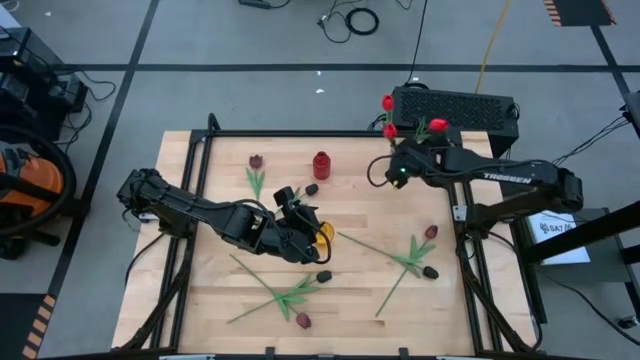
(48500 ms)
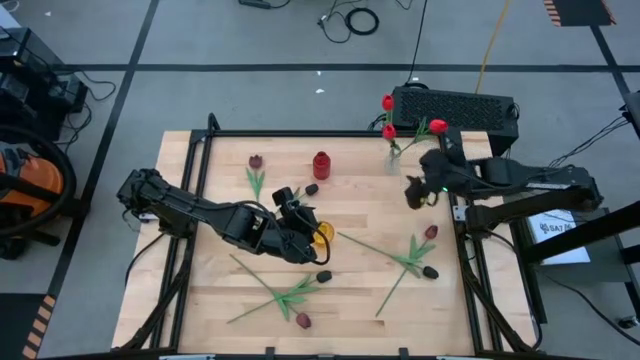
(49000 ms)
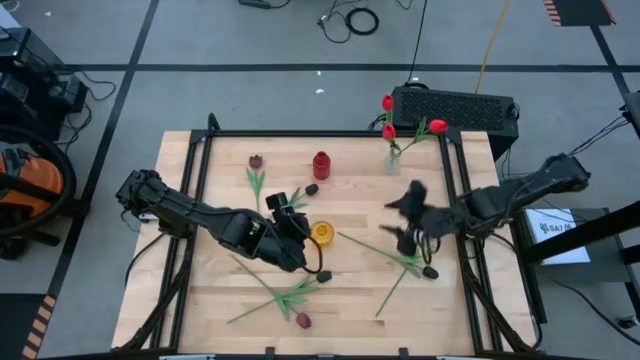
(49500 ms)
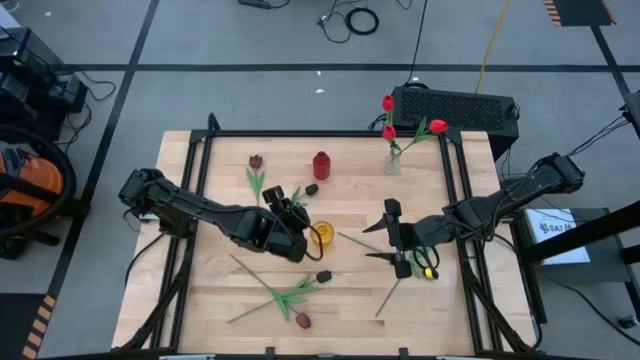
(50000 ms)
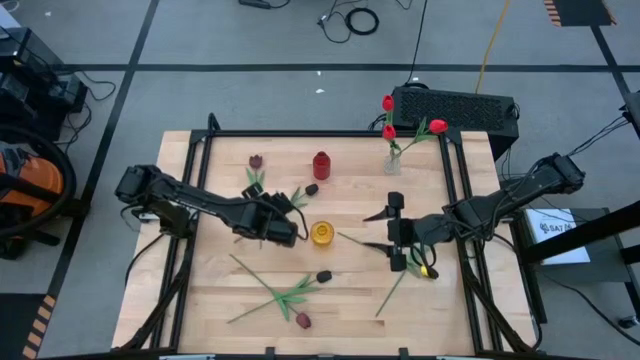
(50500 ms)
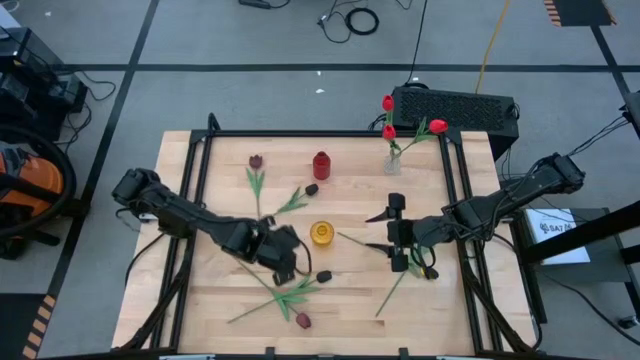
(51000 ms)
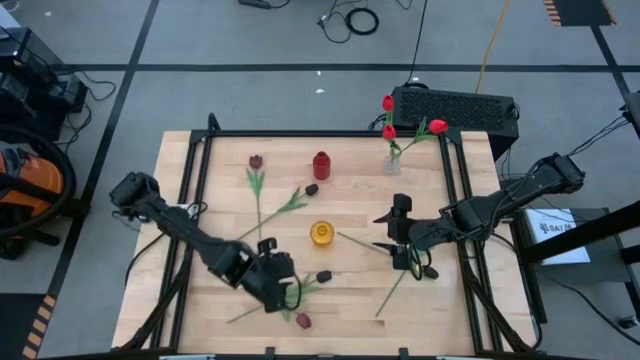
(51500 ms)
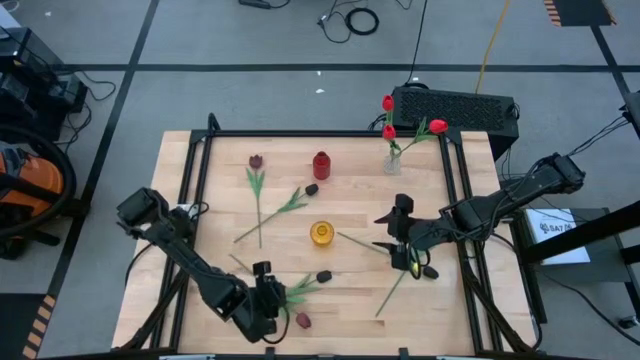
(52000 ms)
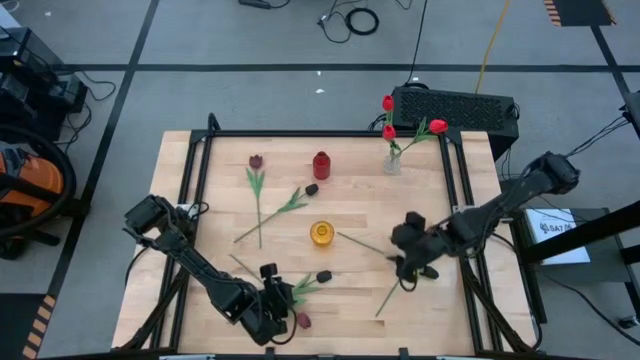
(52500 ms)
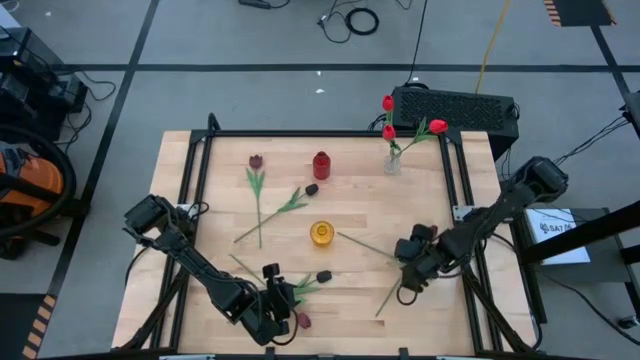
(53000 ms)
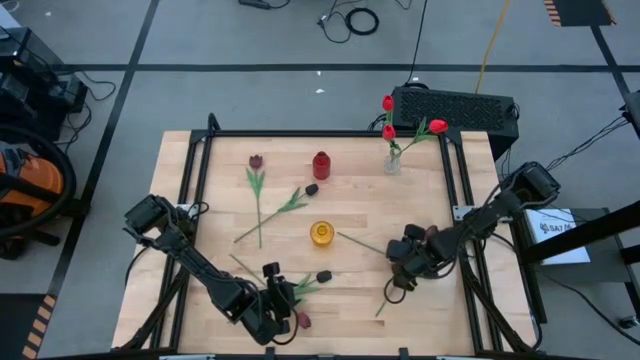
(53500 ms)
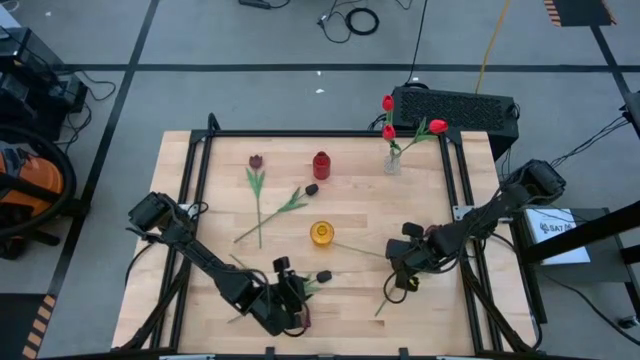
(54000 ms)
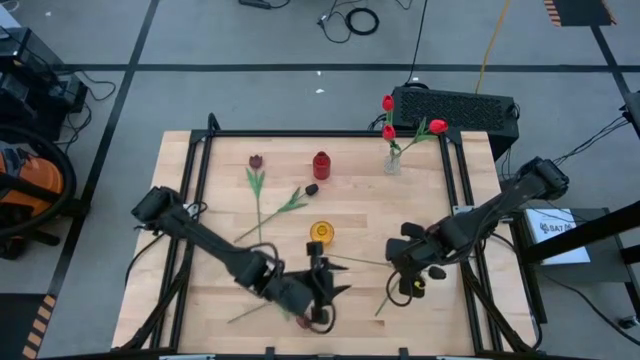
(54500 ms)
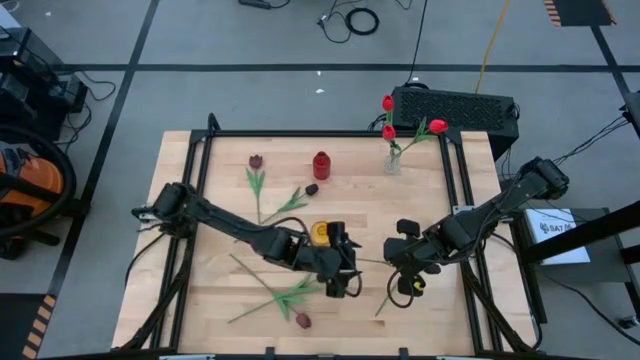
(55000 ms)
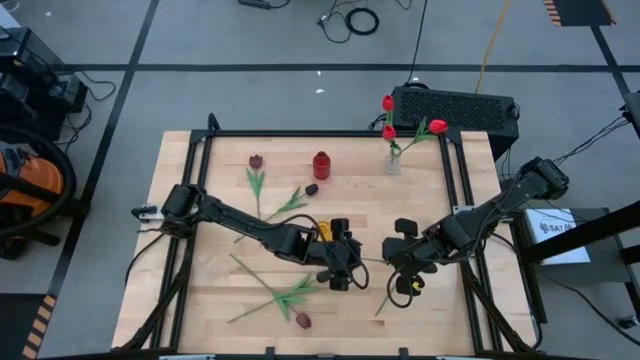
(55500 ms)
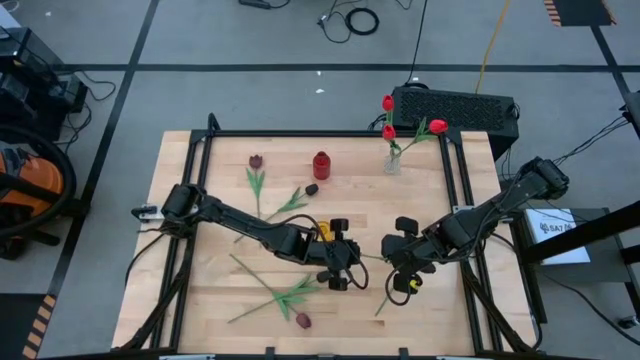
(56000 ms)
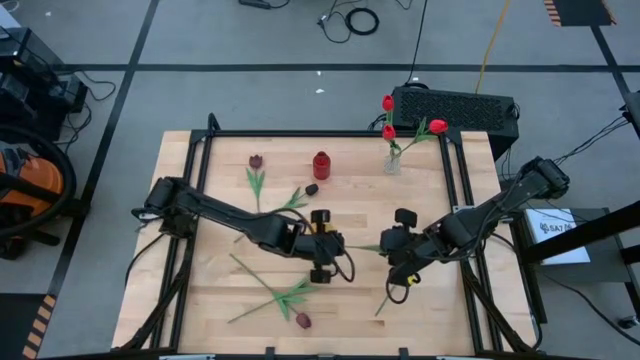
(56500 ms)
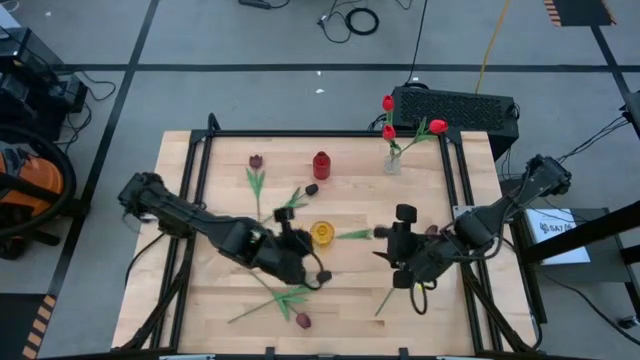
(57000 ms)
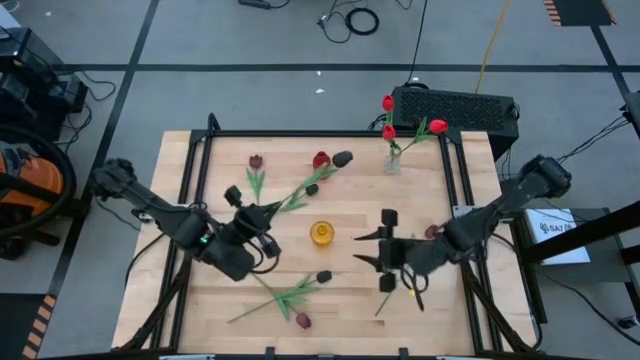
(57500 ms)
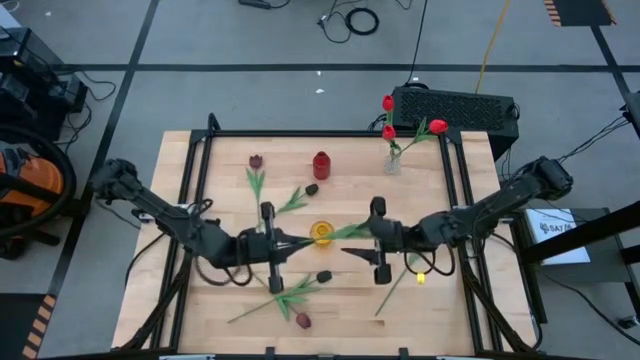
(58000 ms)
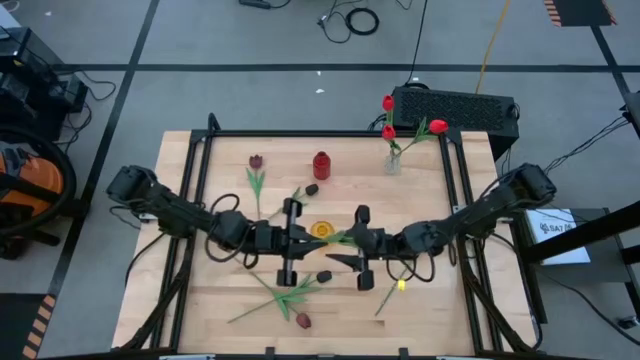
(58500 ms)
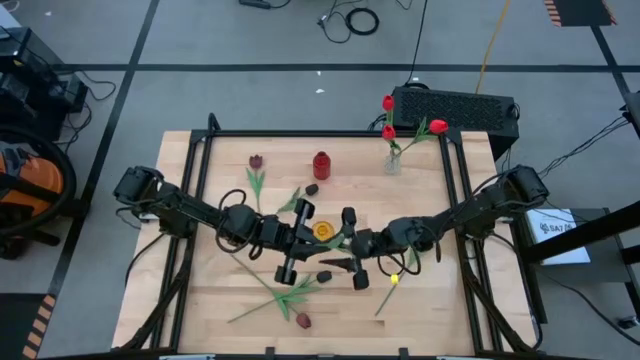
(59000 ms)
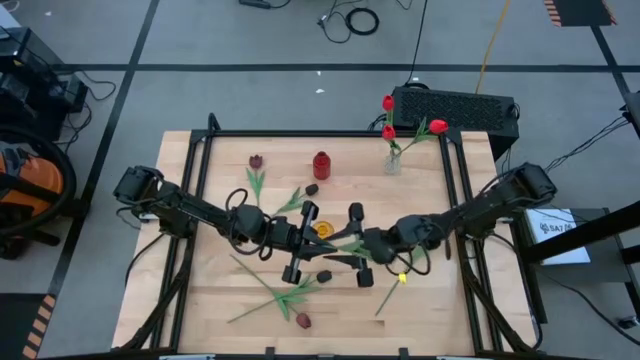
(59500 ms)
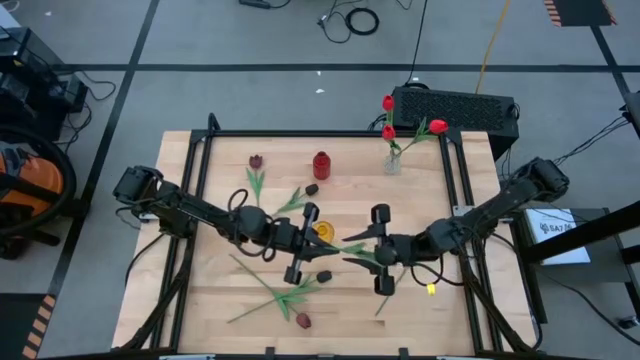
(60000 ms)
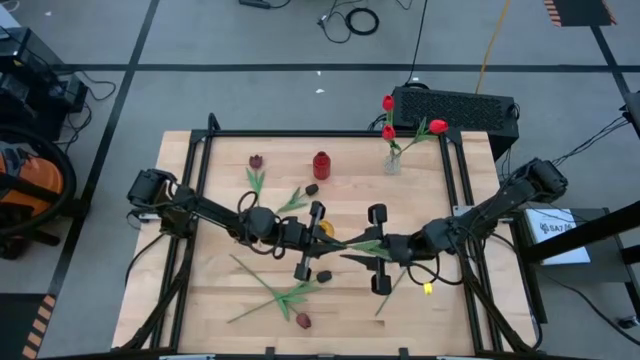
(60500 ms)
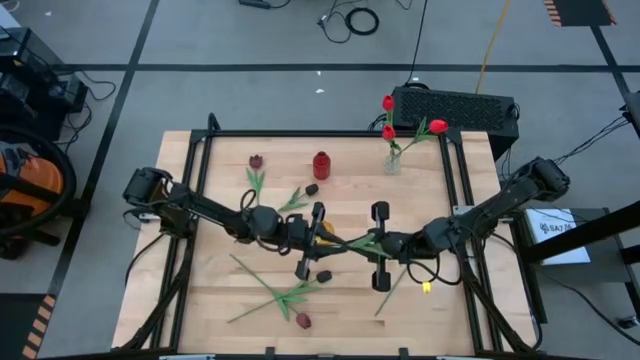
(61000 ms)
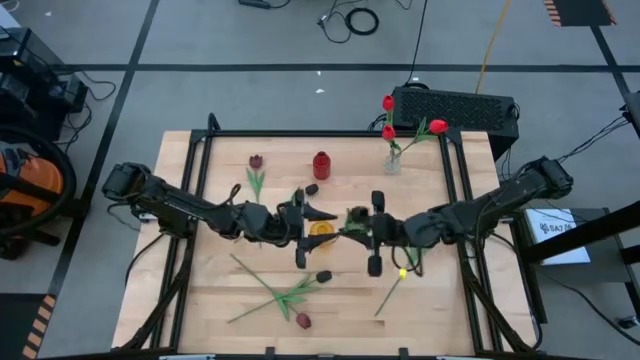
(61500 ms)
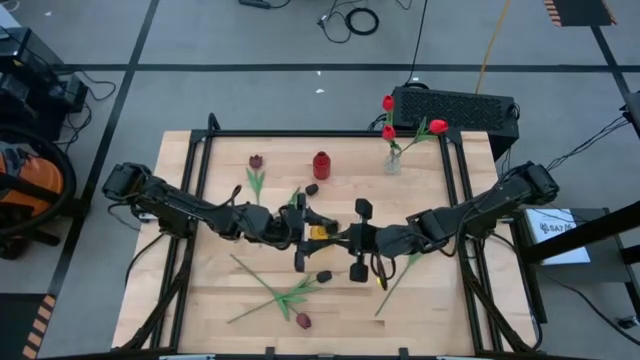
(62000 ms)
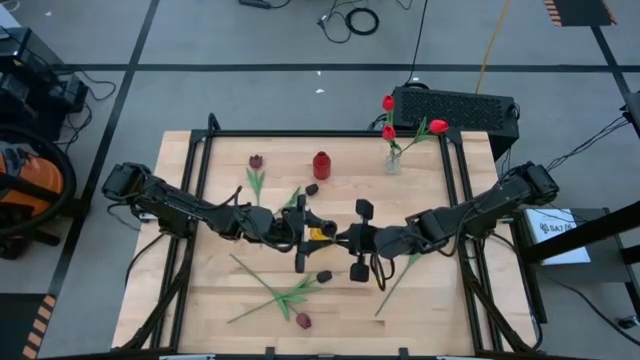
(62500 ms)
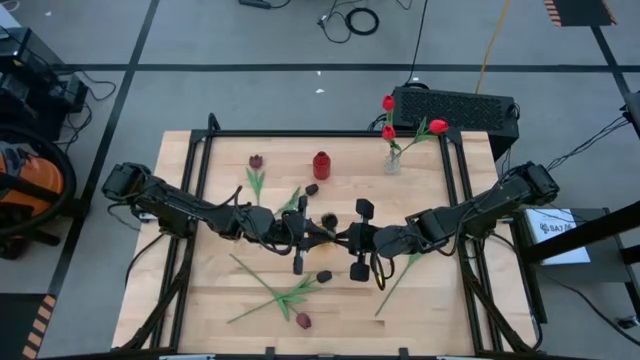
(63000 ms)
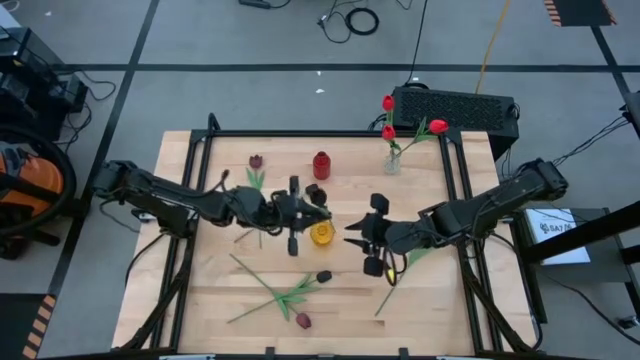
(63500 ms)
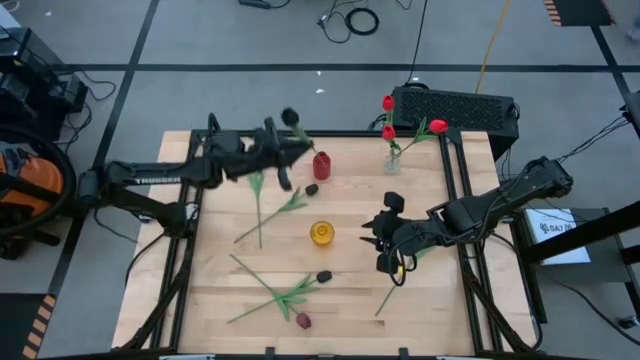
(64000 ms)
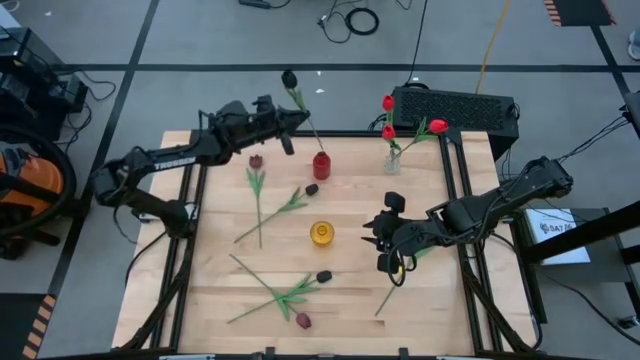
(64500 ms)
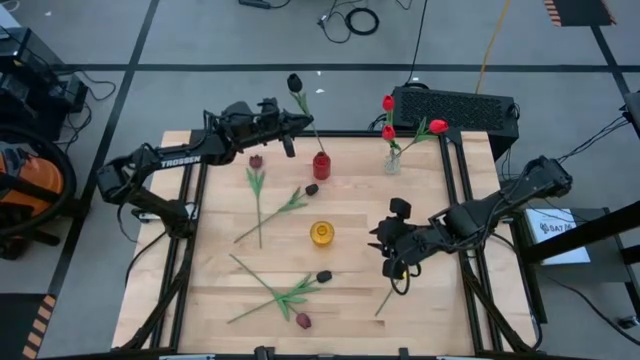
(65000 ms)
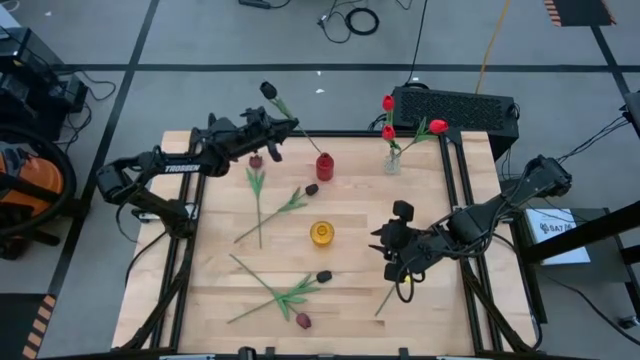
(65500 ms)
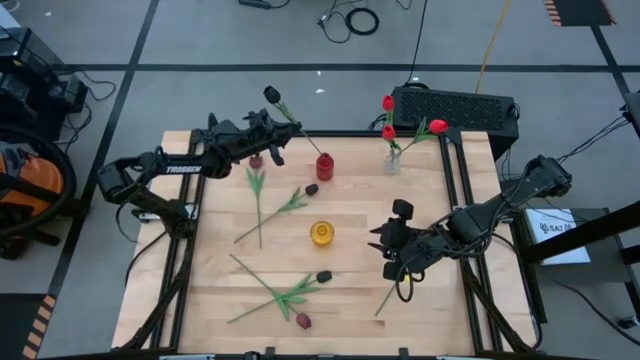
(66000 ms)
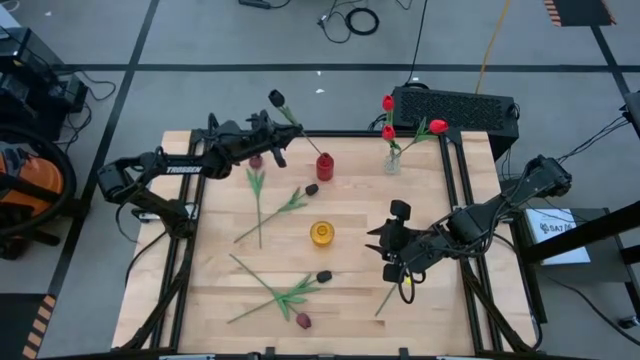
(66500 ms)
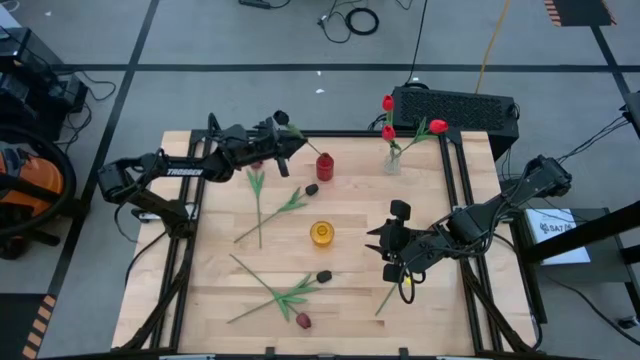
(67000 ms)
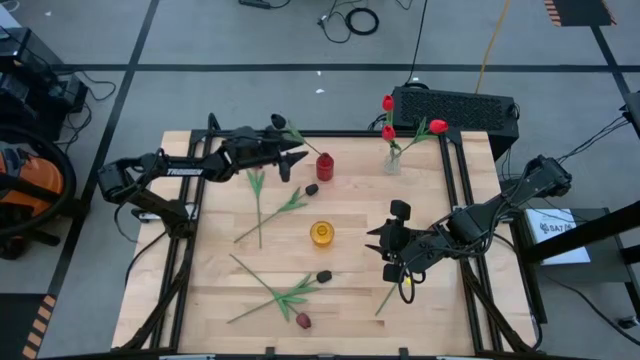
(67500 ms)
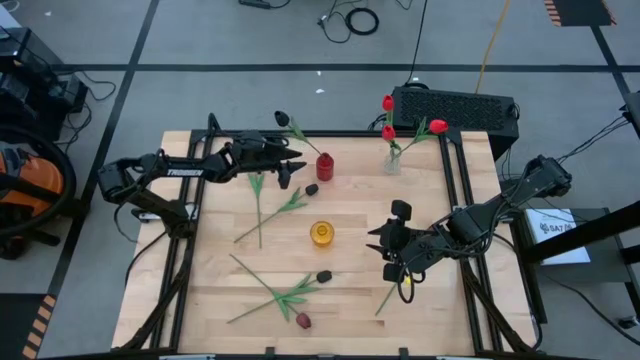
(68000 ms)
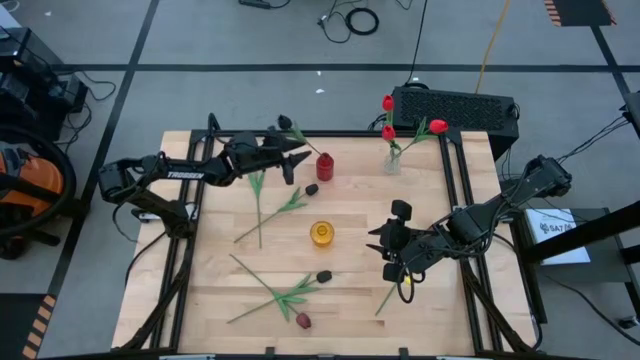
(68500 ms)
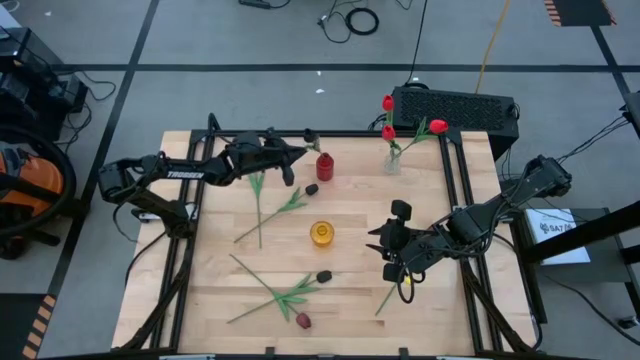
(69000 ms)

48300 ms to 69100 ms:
Task: Sort flowers into vase by color
Put the bottom right black flower into the red vase
